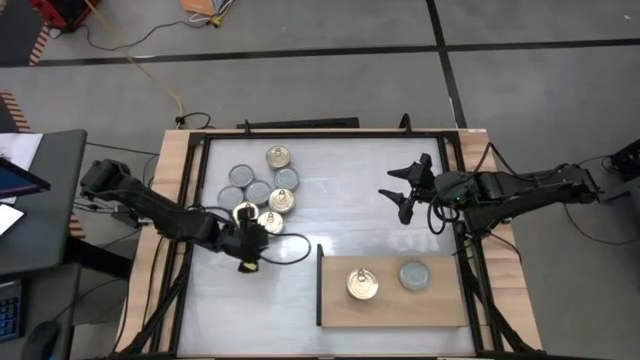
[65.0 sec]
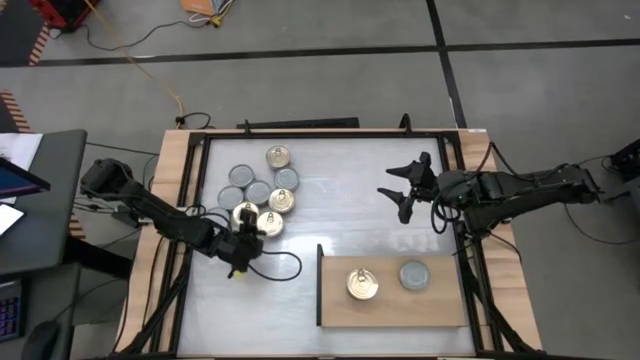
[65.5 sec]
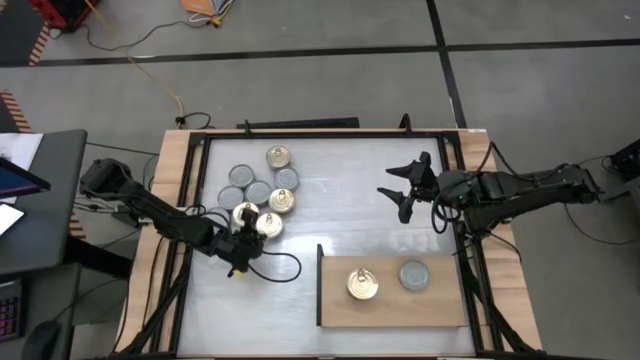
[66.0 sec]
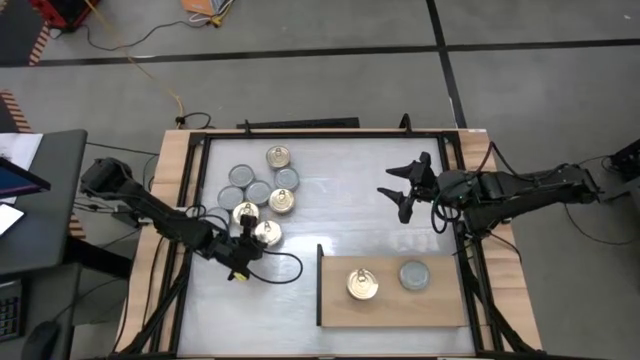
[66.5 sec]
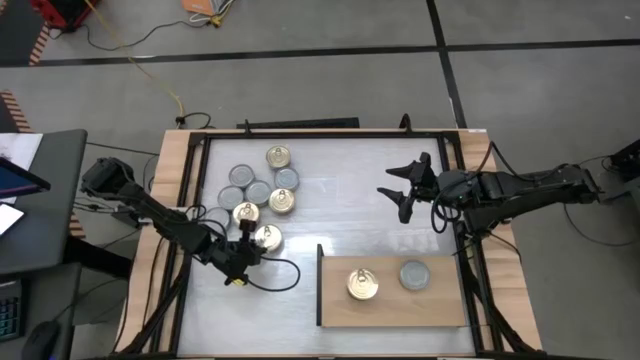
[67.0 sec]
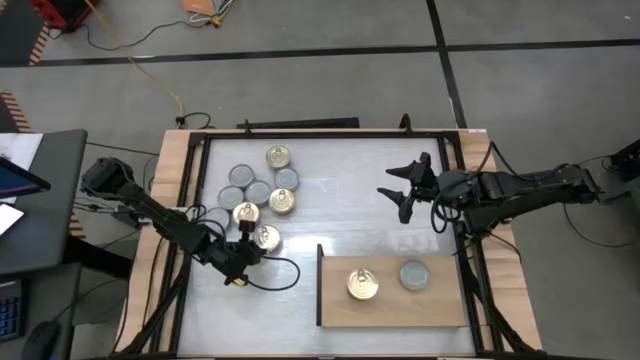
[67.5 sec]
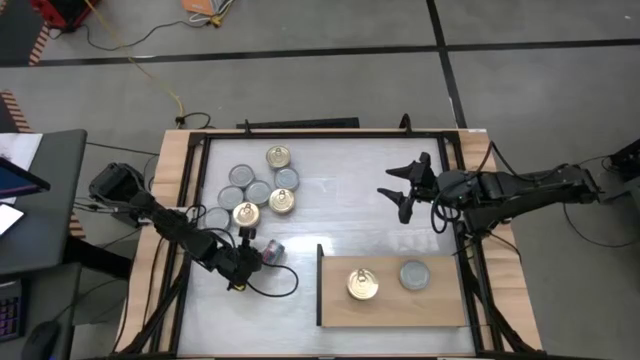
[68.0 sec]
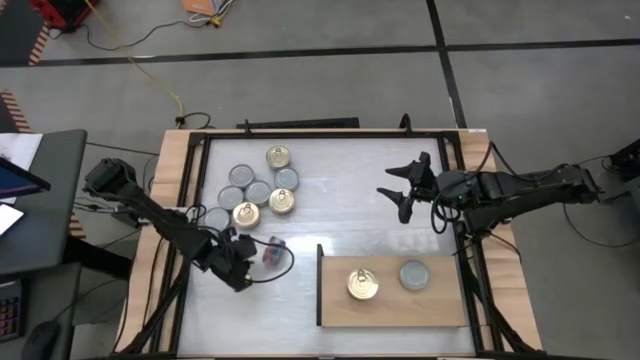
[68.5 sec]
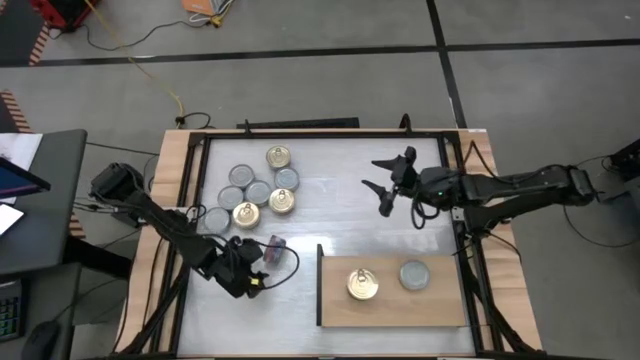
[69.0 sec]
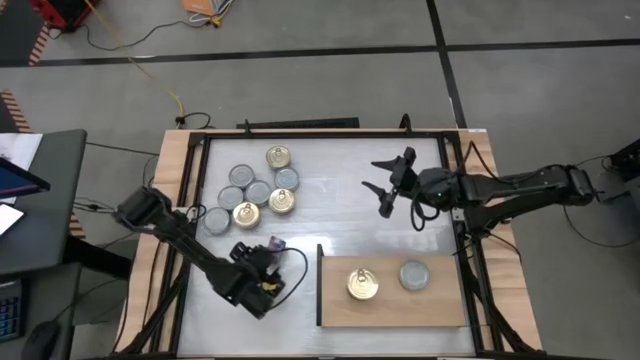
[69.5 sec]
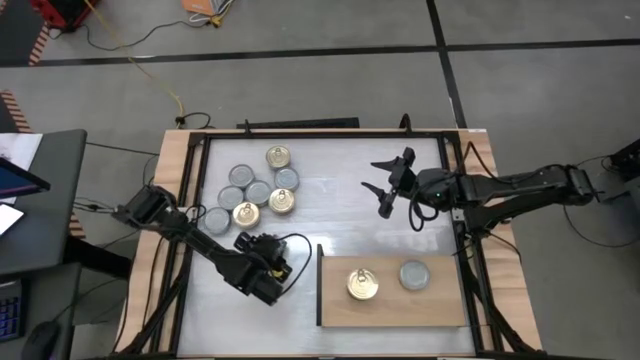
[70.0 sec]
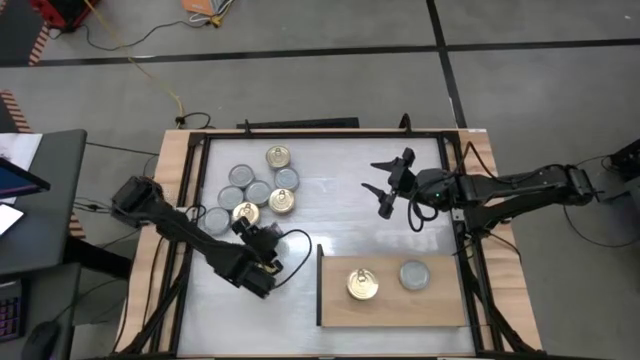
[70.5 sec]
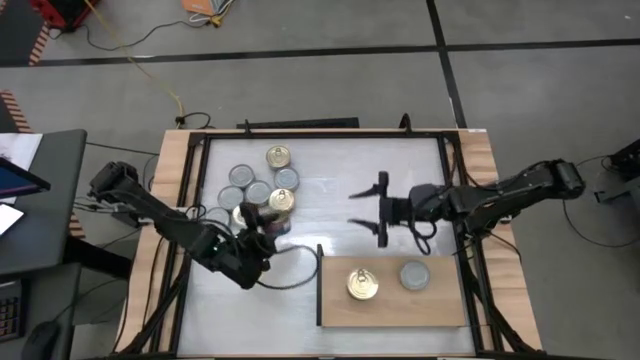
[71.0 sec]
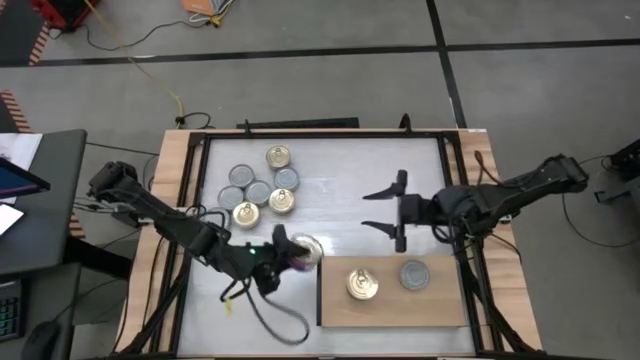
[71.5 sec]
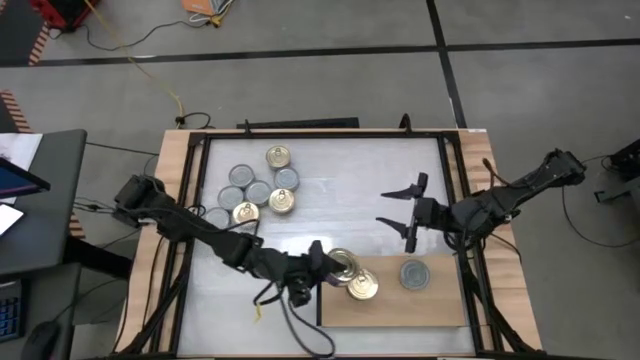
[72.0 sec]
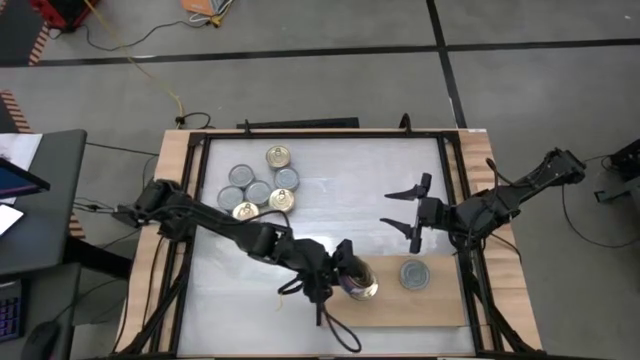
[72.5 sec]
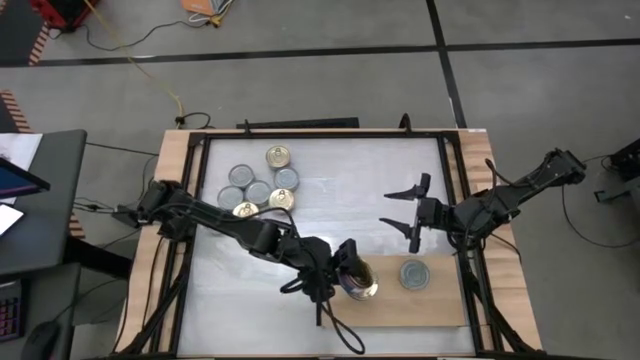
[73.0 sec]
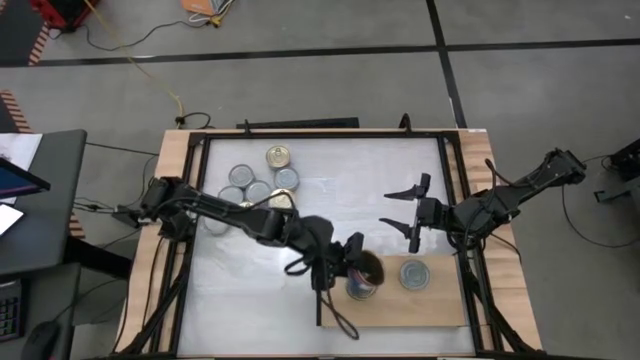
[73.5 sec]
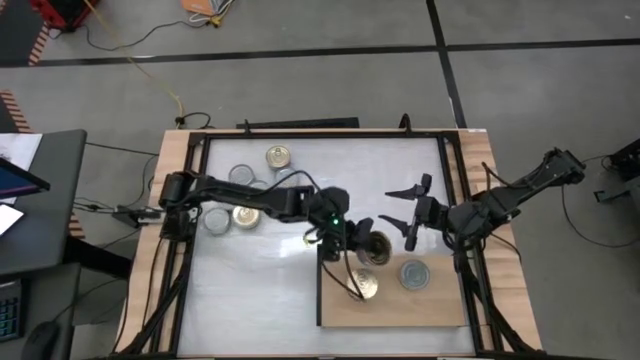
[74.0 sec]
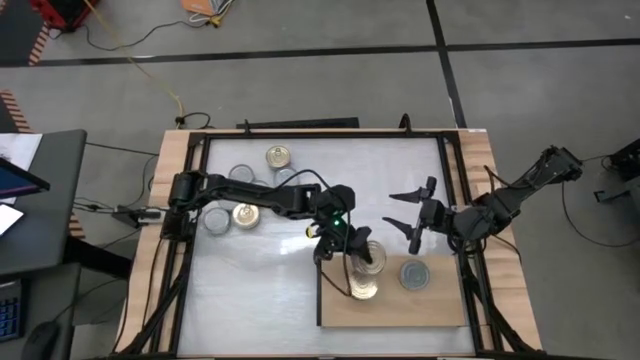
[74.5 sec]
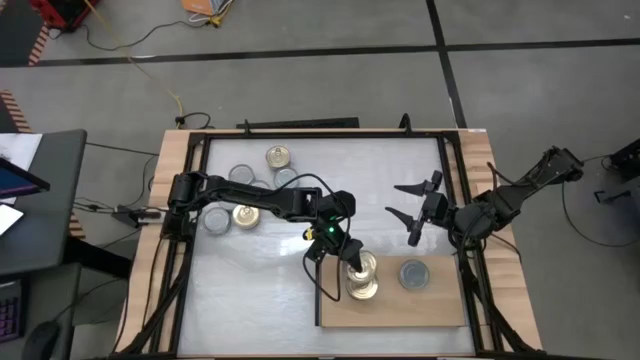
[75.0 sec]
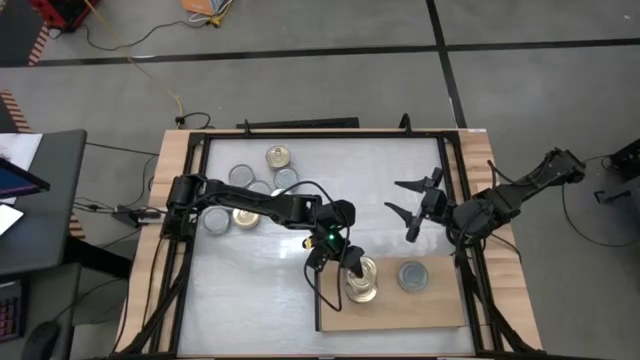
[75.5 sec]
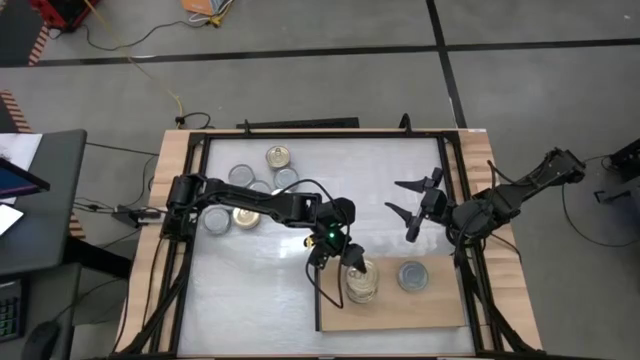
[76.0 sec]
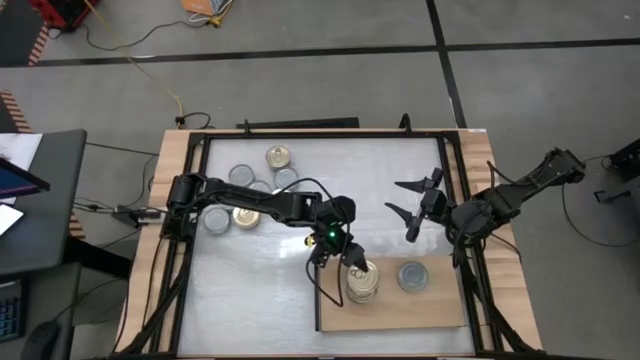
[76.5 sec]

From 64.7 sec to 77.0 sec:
Task: Stack canned seafood by type on shelf
Stack the blue pink tuna can on top of the blue pink tuna can on the shelf

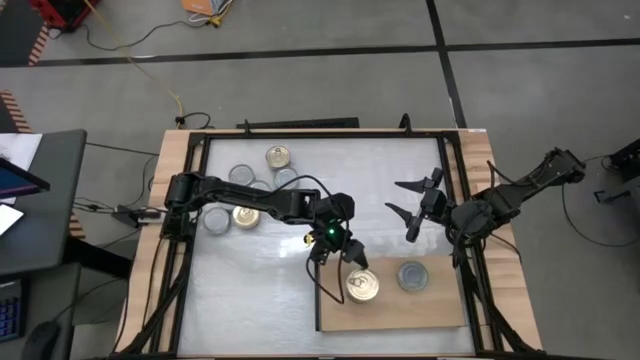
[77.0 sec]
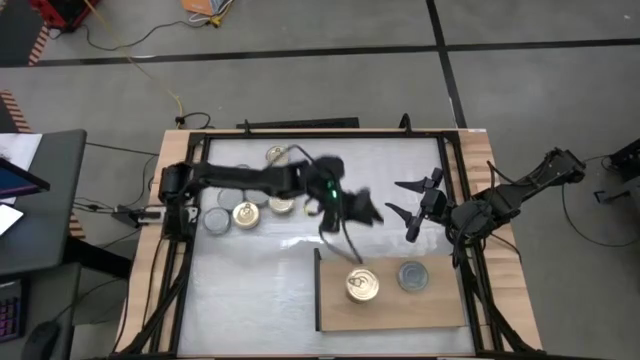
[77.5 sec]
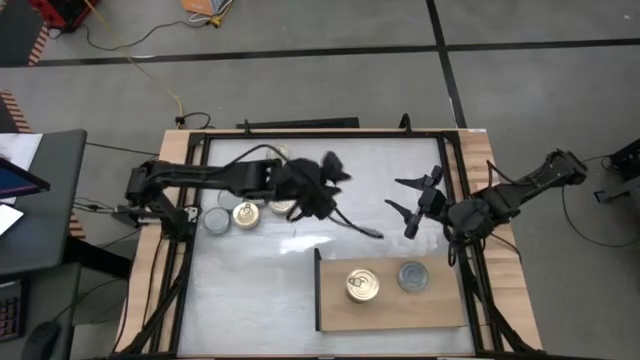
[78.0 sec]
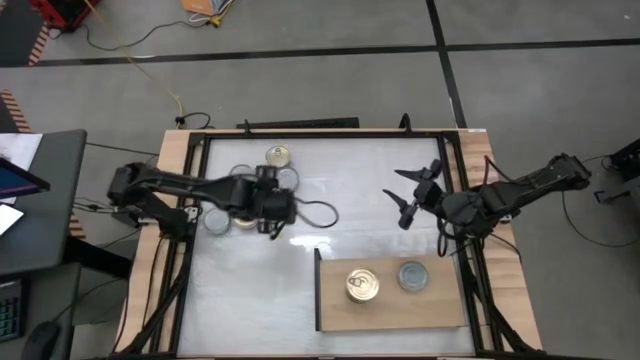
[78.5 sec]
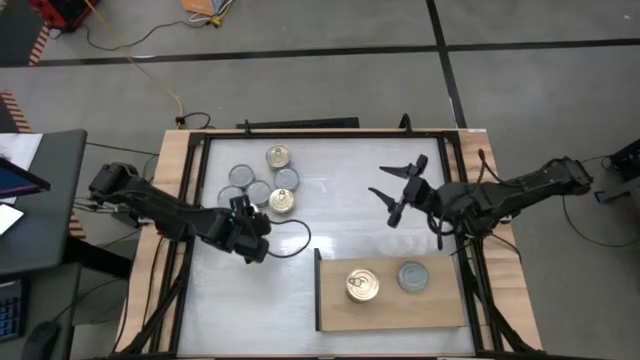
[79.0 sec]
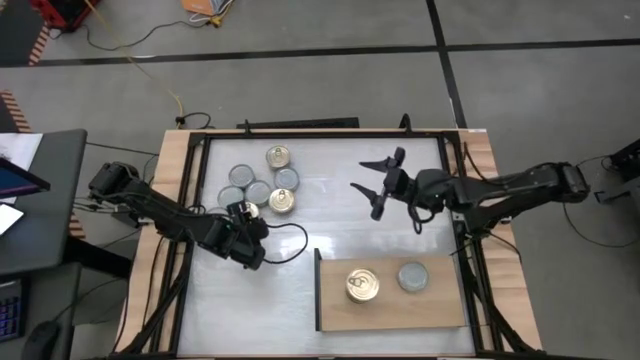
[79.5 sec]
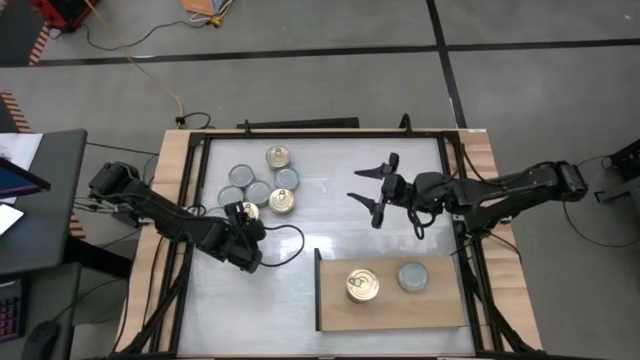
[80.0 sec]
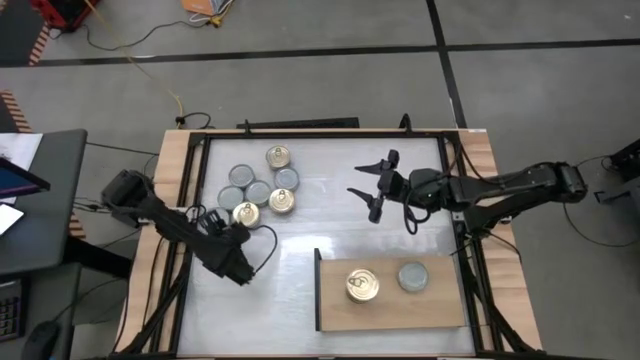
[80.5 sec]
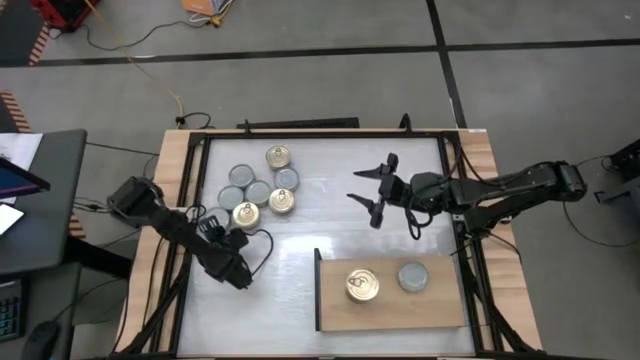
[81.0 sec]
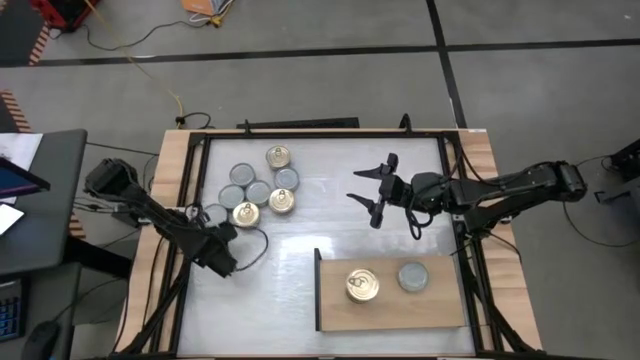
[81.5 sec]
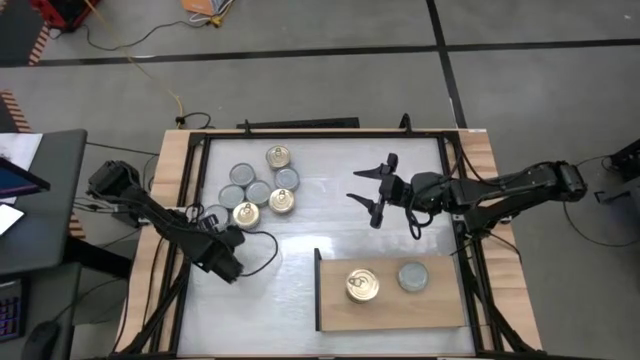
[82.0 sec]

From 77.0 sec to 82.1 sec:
Stack the green tuna can on top of the green tuna can on the shelf
